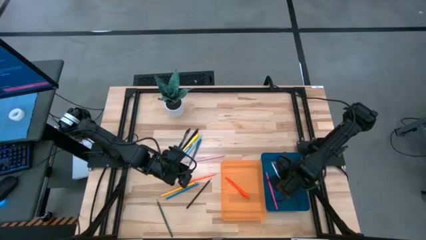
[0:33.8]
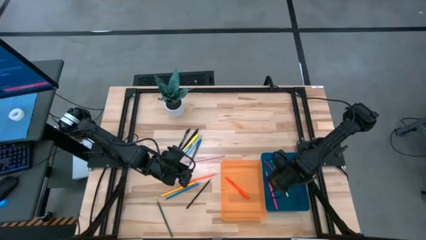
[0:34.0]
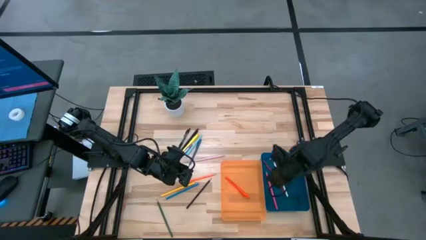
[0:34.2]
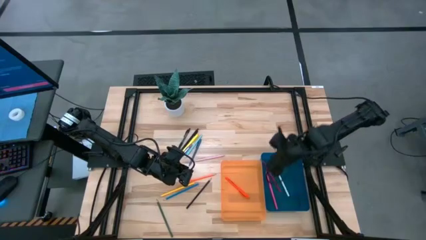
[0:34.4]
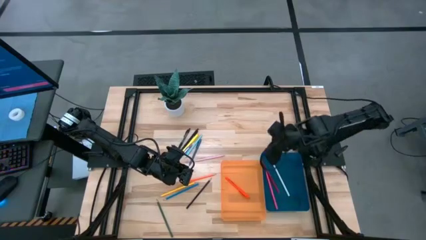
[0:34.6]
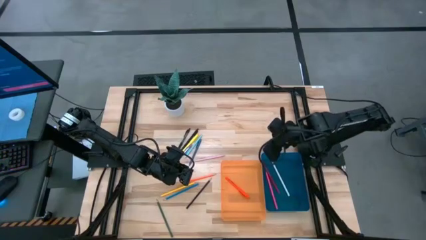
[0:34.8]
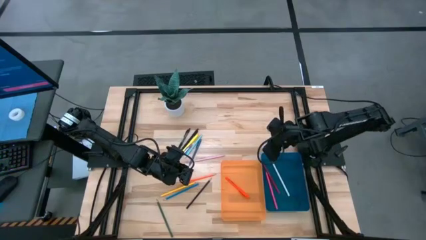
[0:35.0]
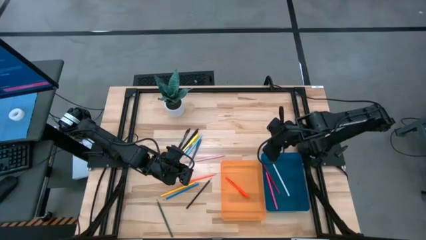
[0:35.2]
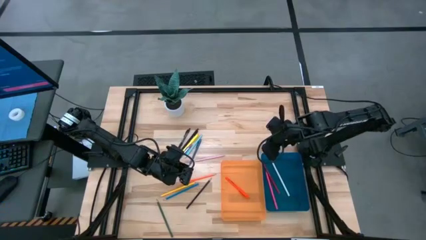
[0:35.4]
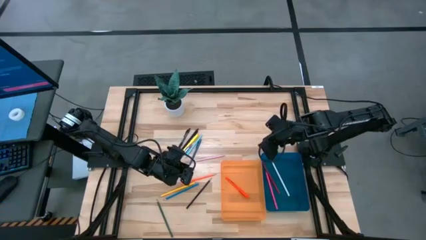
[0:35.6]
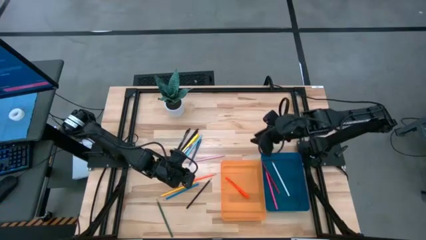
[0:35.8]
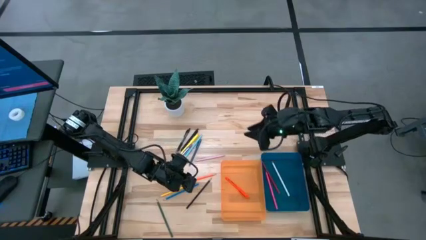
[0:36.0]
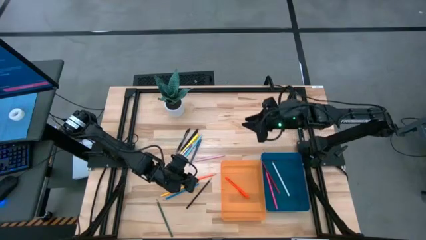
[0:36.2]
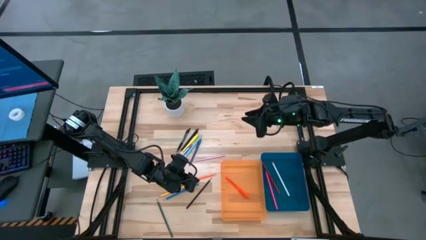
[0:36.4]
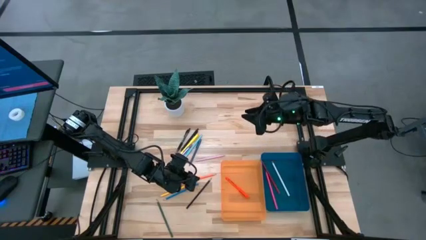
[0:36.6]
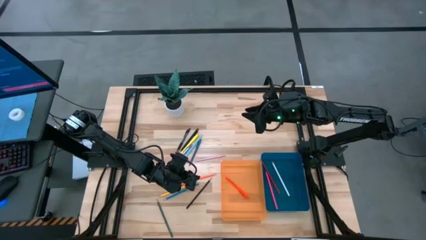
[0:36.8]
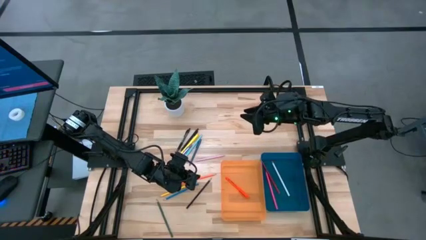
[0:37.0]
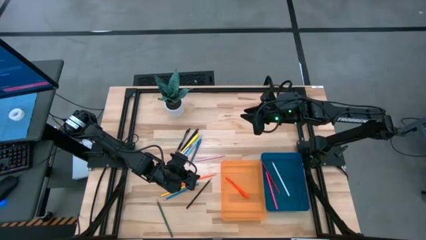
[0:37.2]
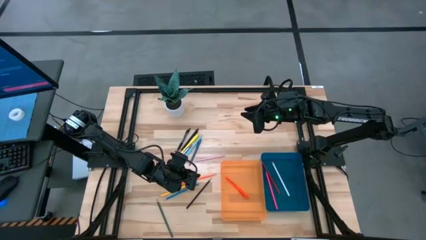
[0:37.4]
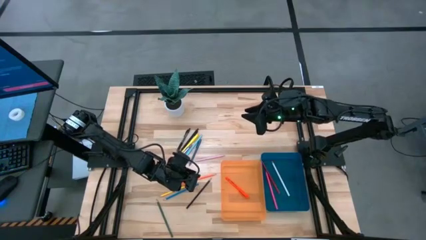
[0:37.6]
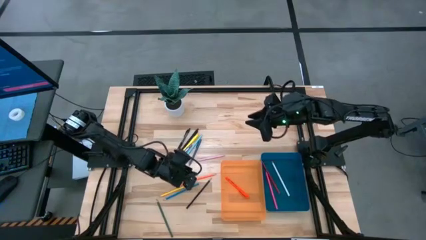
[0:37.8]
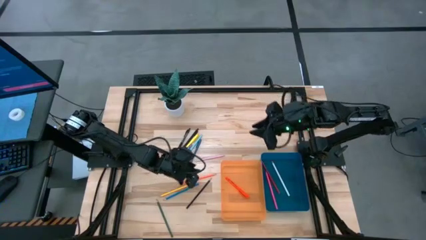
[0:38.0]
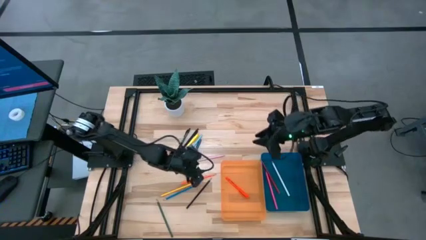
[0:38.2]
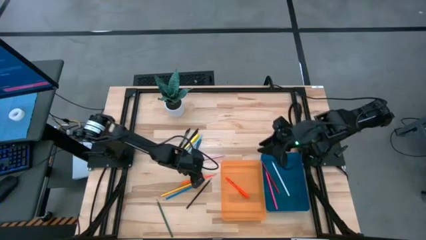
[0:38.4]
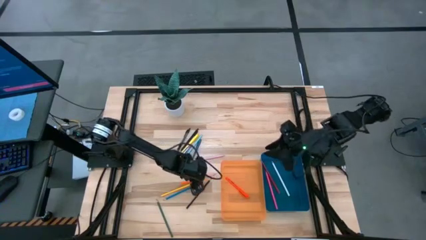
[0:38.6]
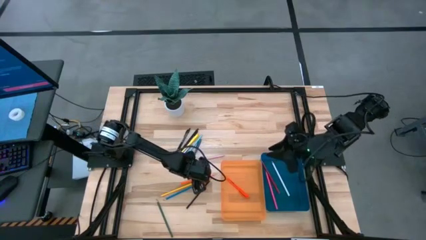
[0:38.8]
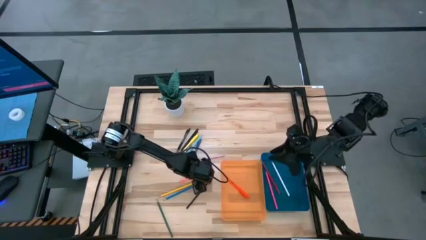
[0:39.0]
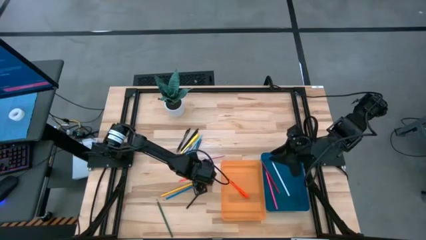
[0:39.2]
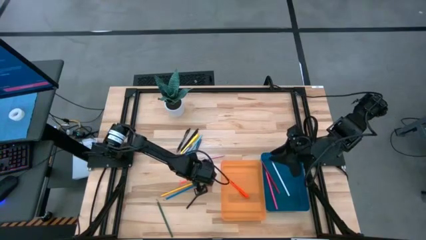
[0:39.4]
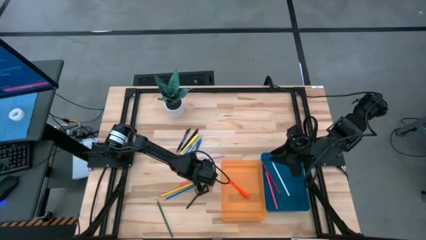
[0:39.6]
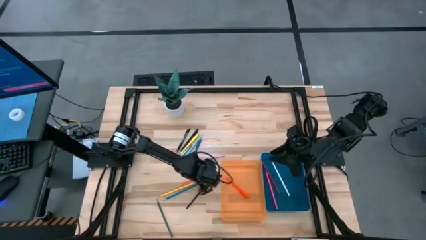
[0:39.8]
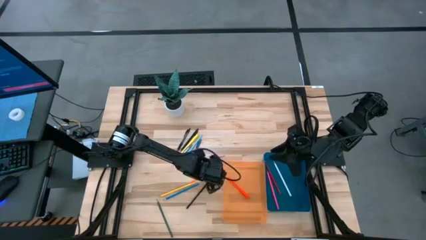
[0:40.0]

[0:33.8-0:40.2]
Task: Sort pens & pencils
Put the orange pencil into the blue bin

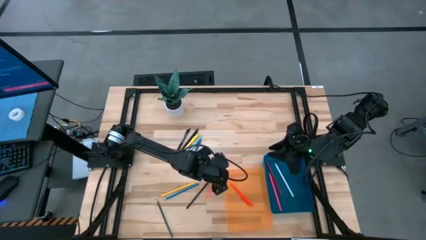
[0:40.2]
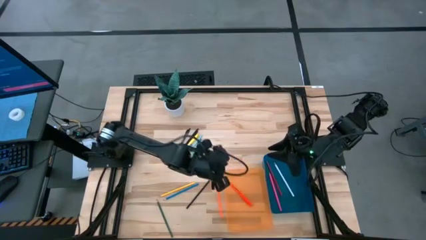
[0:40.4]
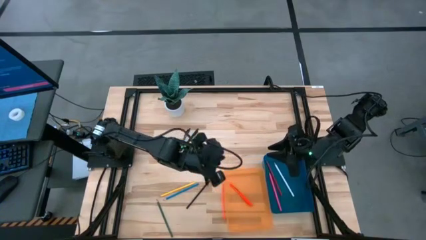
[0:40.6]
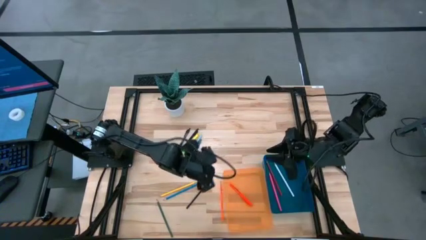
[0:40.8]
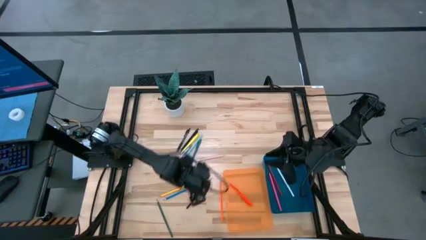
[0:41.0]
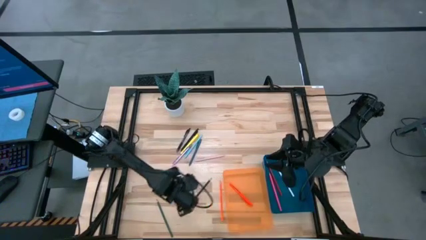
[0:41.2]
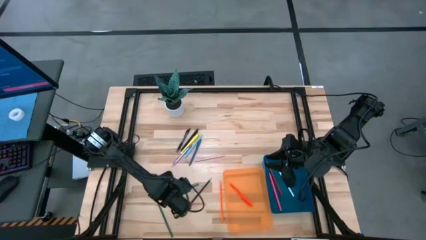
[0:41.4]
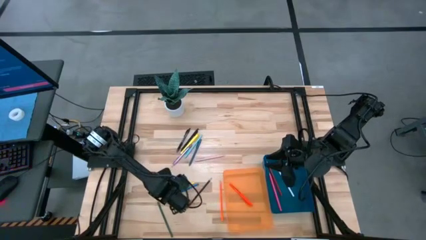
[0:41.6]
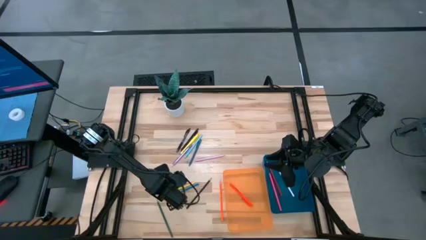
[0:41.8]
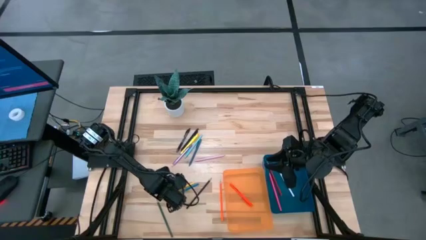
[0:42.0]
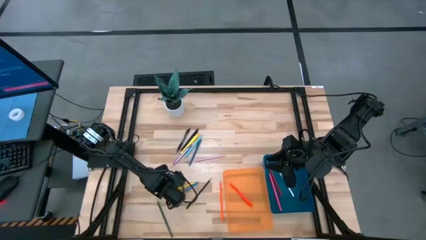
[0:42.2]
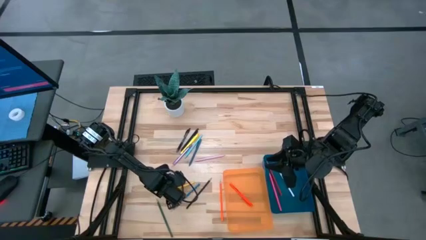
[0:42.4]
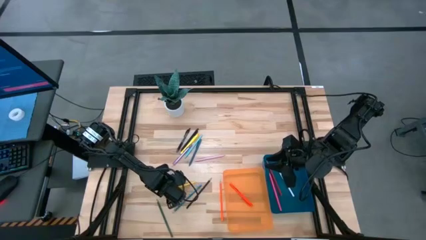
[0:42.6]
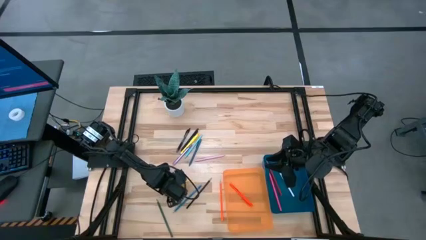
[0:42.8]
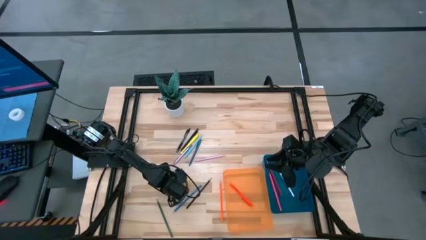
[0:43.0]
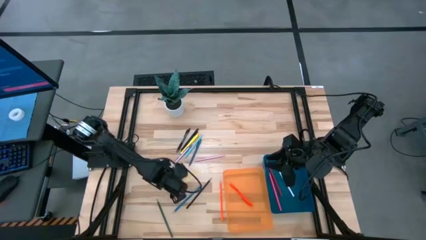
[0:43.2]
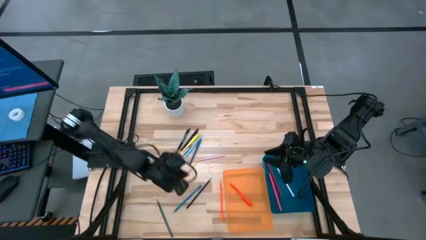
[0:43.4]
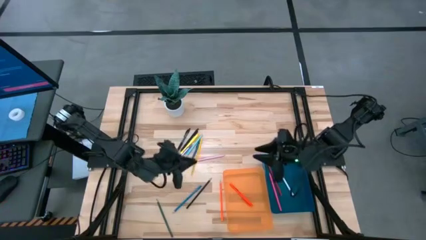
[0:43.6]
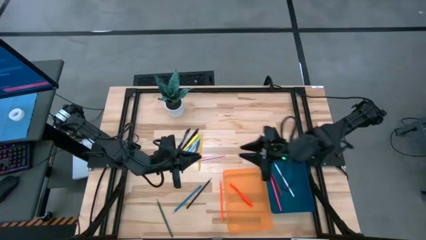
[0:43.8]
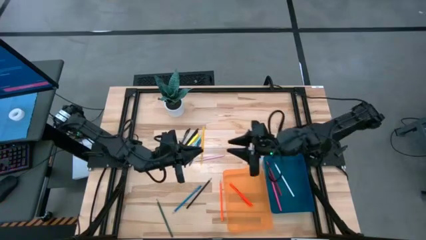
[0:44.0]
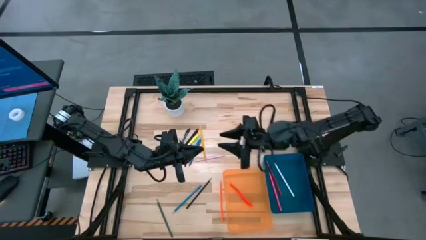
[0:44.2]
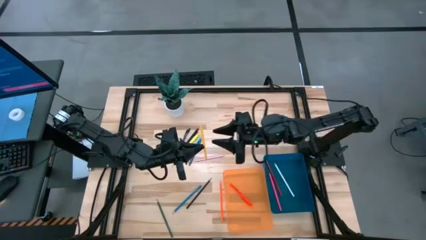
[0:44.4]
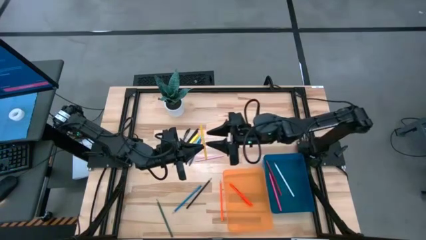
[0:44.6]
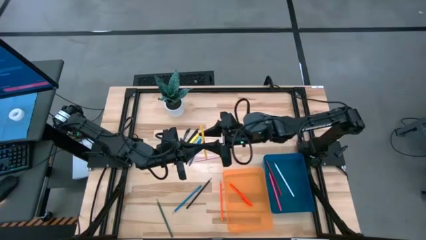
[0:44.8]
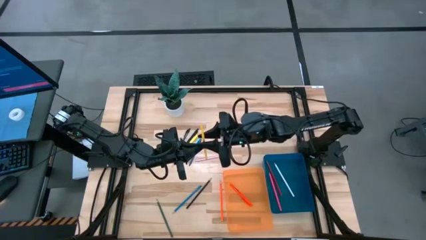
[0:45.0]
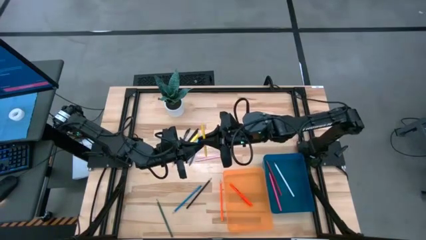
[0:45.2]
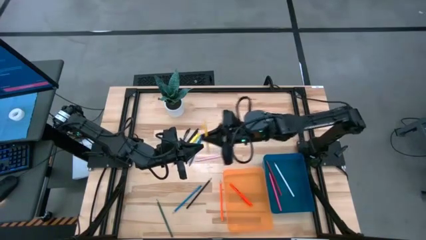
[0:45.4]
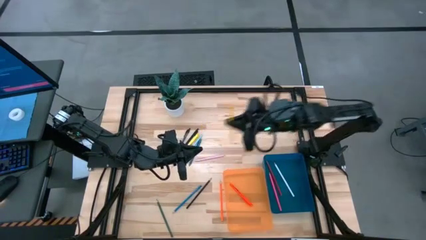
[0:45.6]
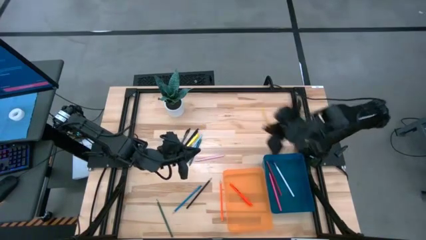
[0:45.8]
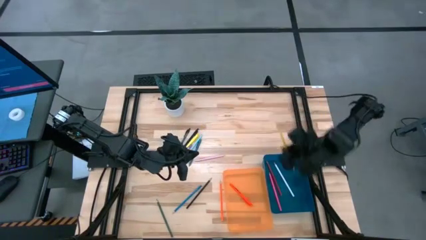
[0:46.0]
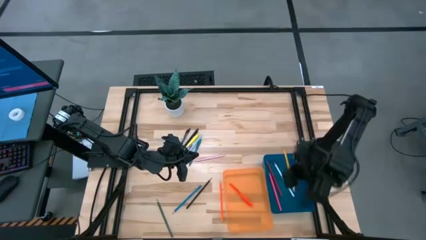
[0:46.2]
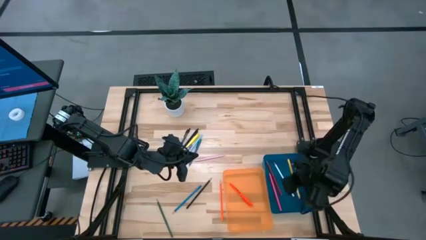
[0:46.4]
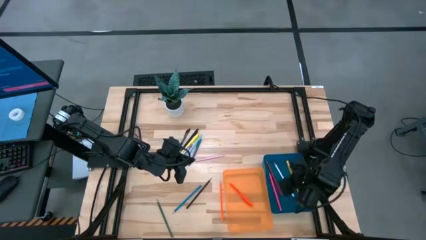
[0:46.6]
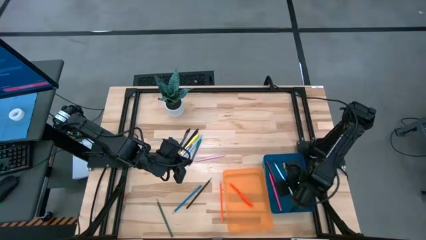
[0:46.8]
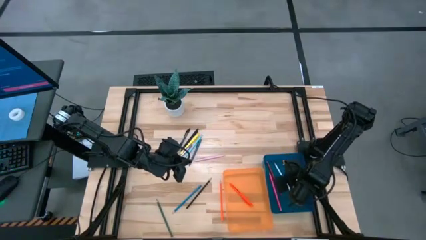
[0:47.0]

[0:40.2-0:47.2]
Put the yellow pencil into the blue bin

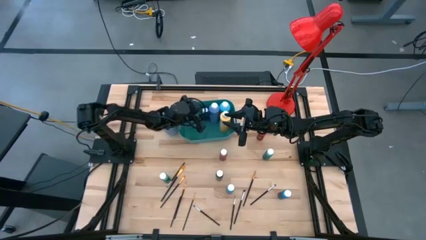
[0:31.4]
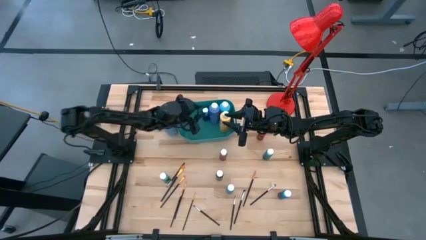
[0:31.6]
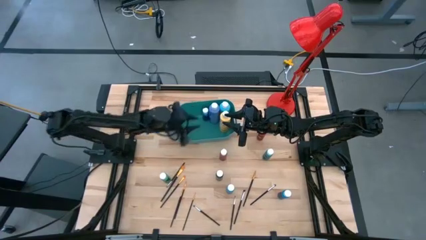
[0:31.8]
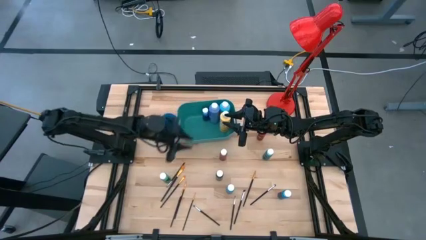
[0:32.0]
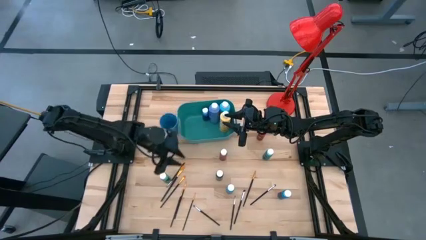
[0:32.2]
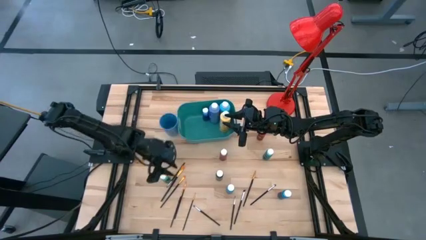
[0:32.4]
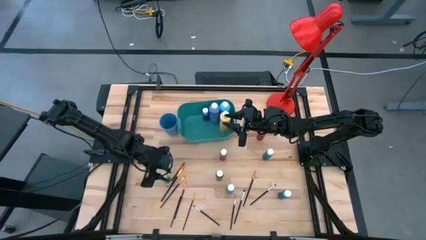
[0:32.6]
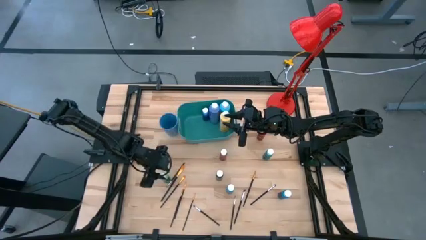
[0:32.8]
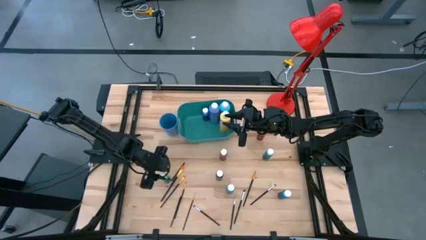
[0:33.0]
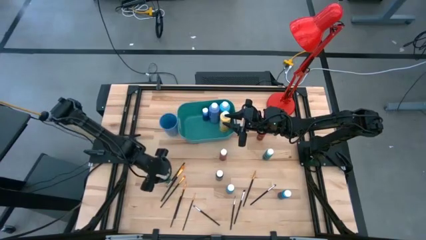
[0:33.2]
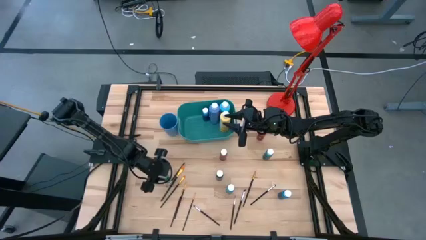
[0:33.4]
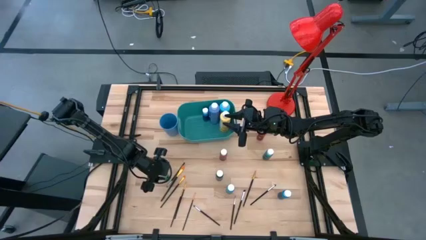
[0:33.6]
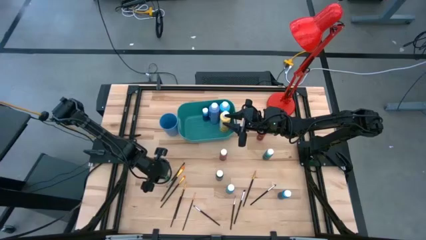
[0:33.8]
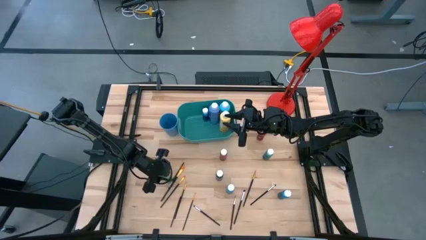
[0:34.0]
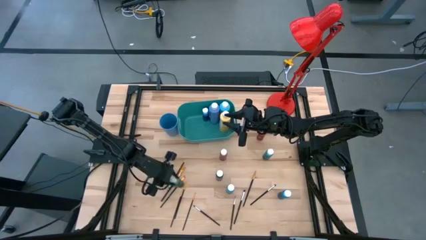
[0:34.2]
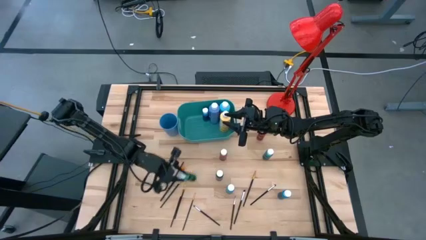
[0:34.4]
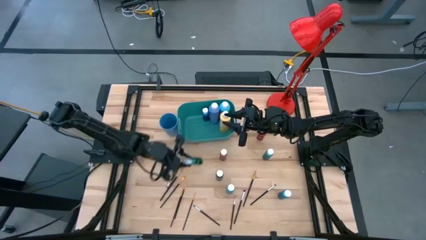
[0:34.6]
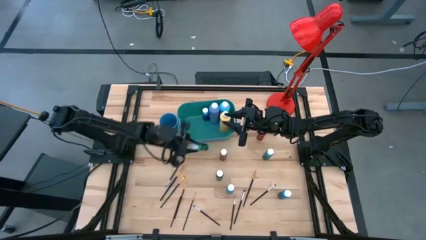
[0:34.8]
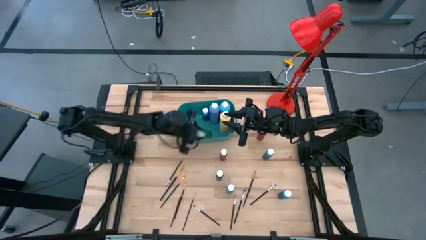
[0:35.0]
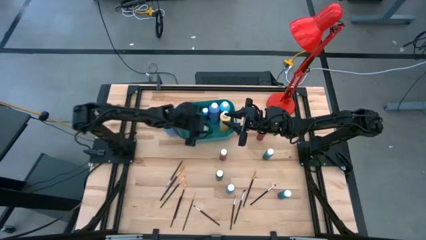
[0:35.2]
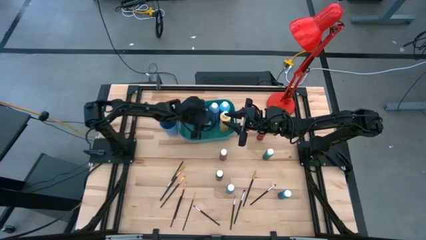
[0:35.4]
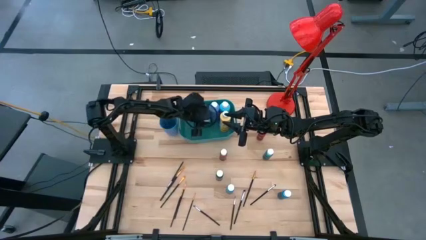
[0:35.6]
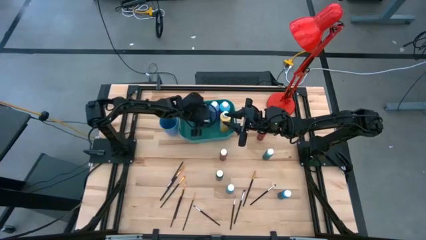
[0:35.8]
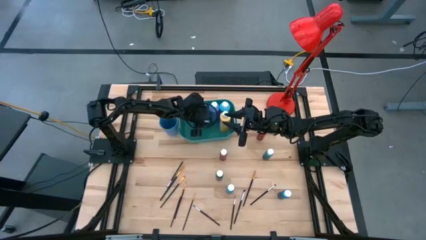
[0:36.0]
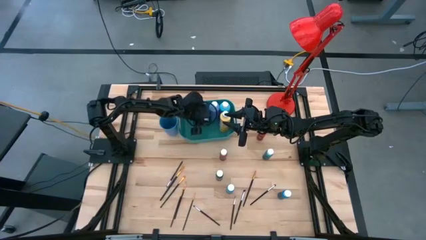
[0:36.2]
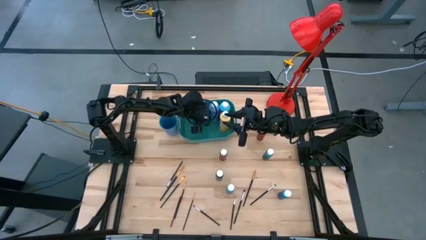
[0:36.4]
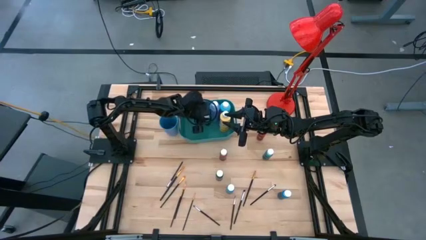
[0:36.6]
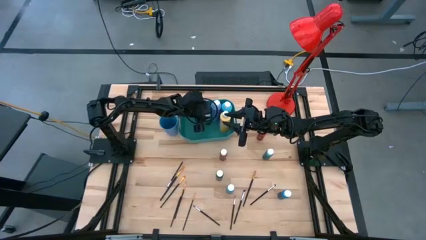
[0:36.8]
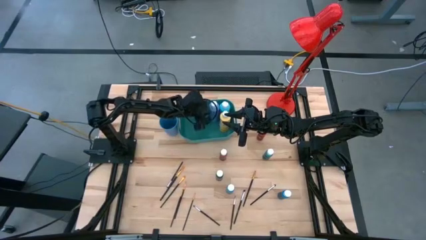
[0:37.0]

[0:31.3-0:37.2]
Task: Pick & Place Paint Supplies
Put the small green paint bottle into the green bin
